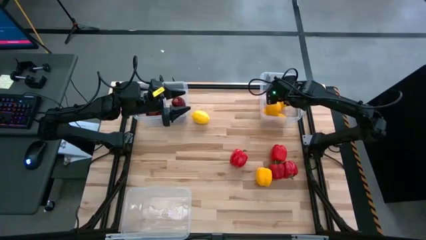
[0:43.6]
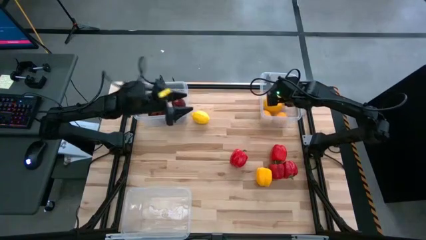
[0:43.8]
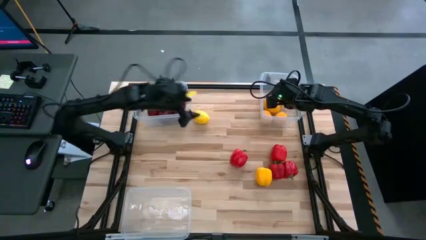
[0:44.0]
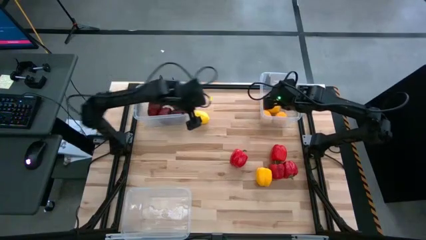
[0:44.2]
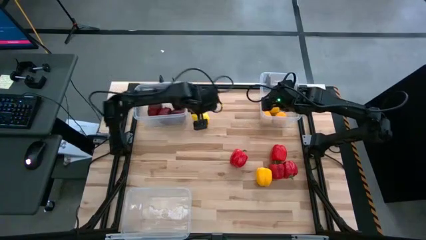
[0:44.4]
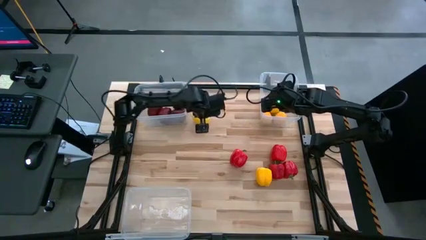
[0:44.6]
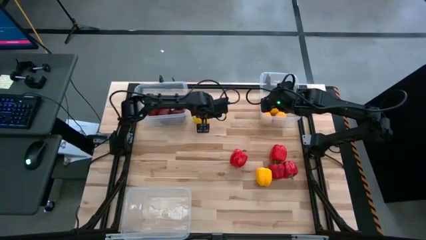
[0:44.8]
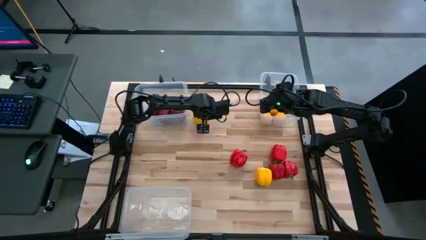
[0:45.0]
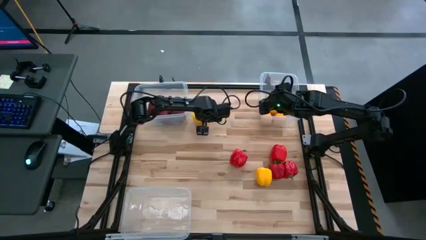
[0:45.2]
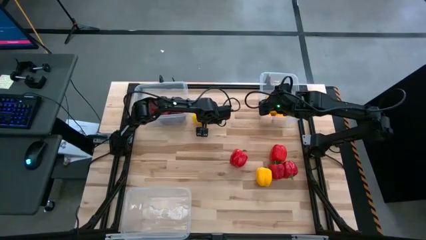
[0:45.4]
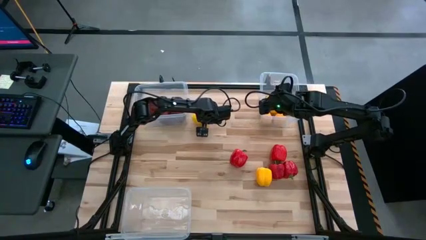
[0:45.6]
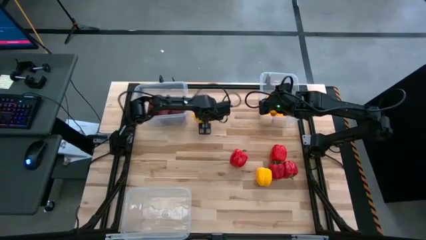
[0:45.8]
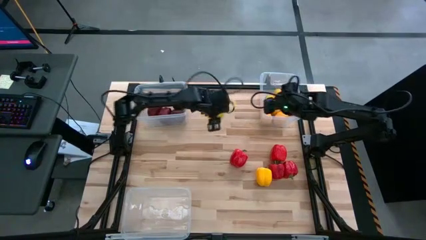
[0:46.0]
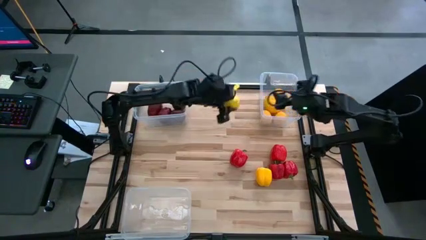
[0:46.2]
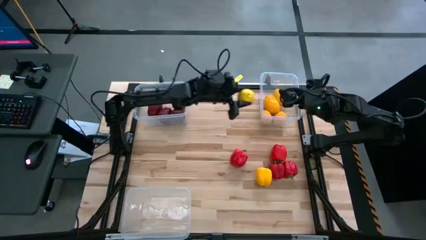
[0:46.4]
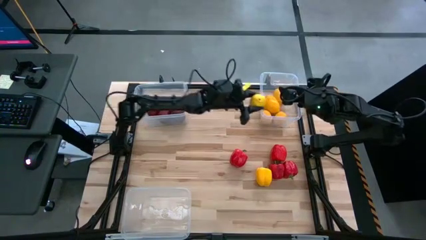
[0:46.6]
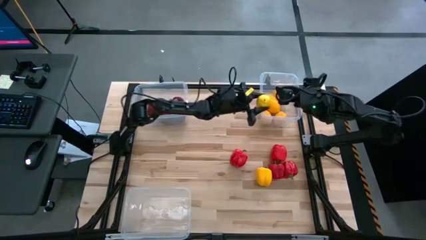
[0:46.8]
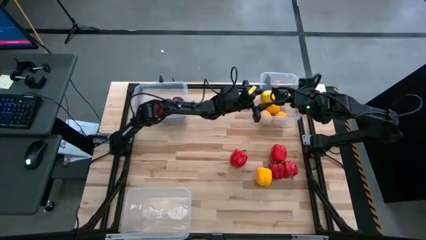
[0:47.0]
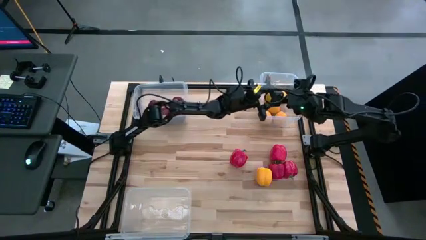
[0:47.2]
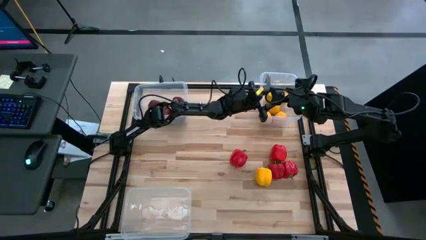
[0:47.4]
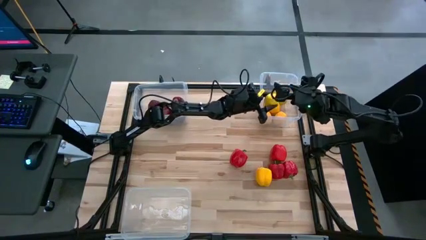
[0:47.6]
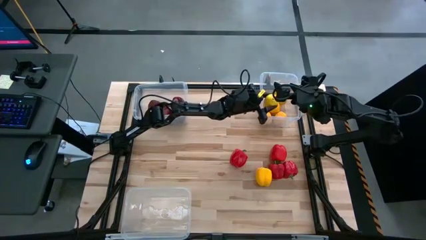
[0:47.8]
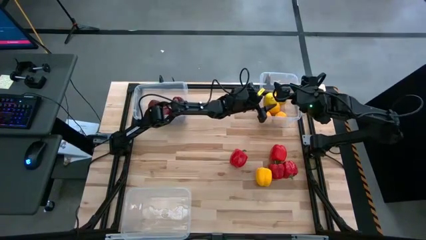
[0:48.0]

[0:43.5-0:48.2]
Task: Sort produce into baskets
Put the yellow lemon into the top-right transparent bin

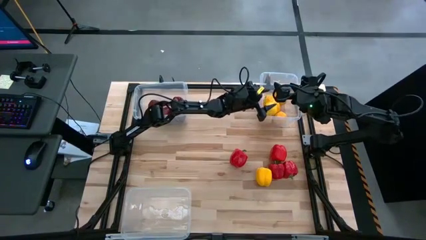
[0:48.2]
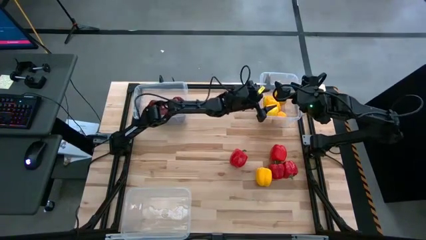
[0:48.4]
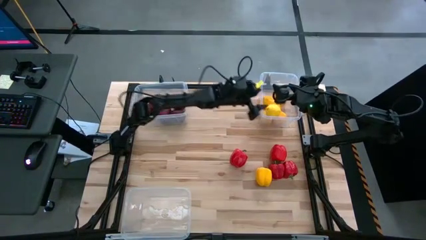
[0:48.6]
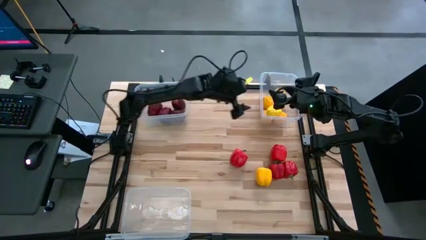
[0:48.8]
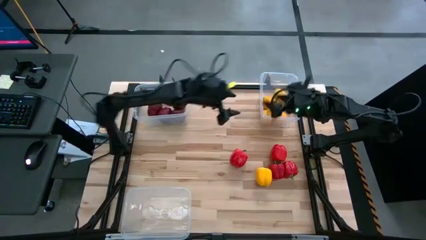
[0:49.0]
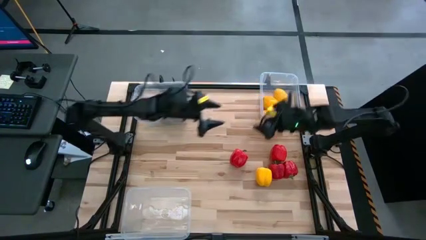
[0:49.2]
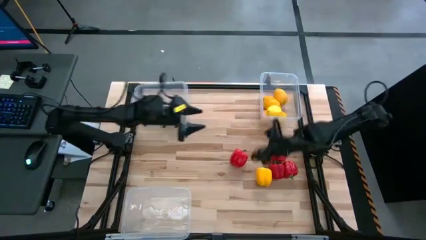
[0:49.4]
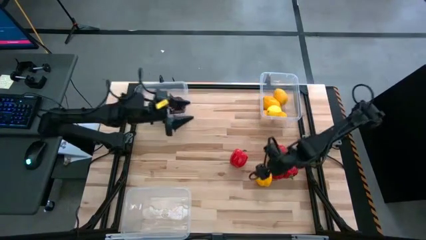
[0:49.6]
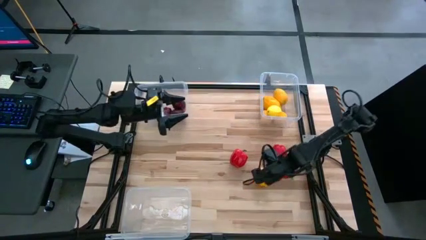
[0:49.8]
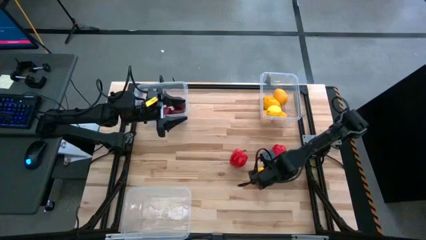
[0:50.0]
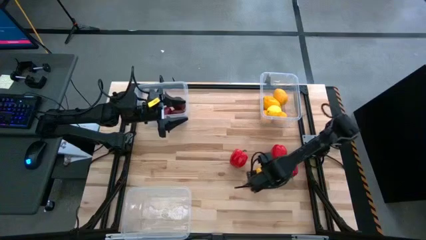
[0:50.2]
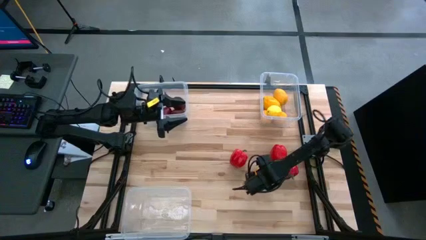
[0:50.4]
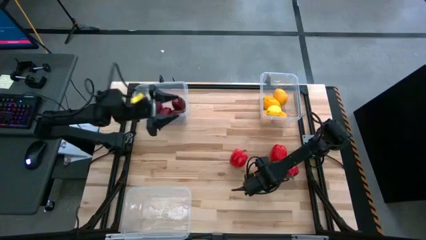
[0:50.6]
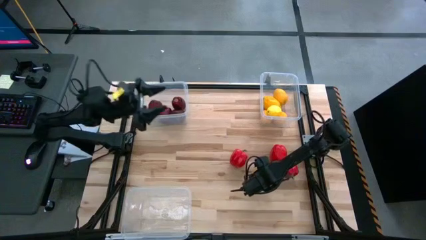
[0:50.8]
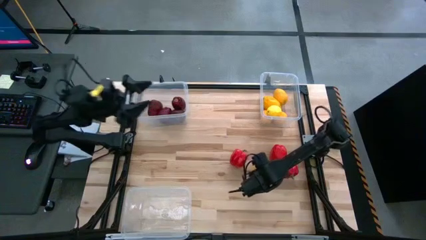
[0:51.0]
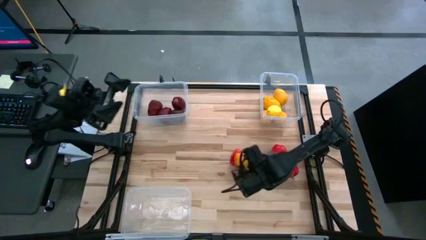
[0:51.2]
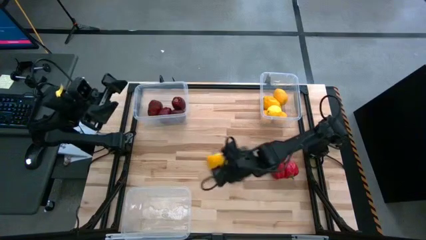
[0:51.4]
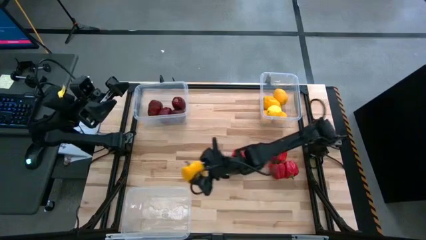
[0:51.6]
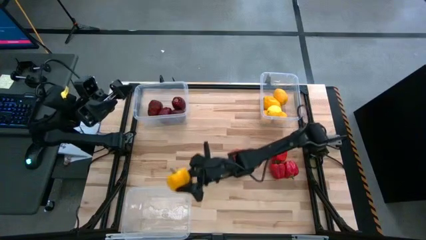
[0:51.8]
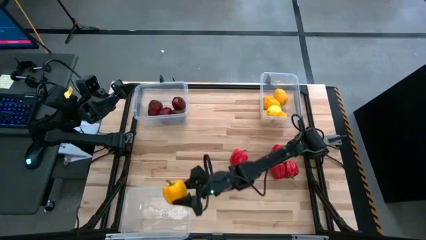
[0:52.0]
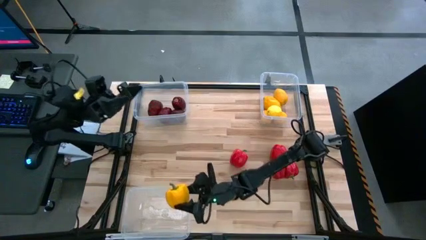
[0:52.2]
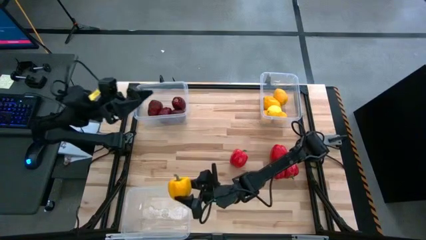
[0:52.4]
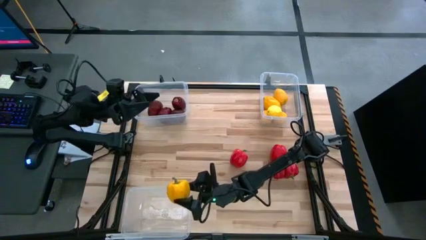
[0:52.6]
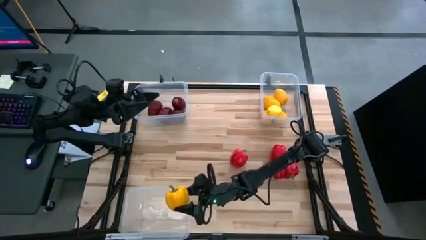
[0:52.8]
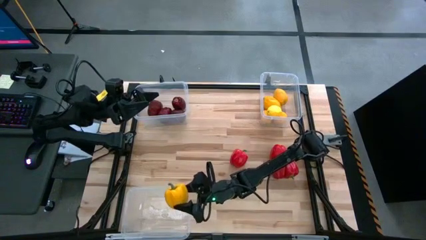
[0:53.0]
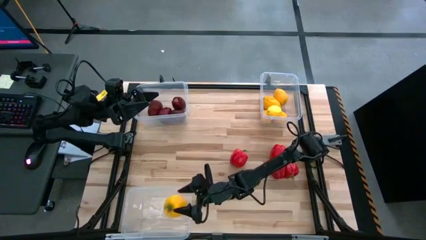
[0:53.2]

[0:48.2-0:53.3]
Put the yellow bell pepper into the bottom transparent bin

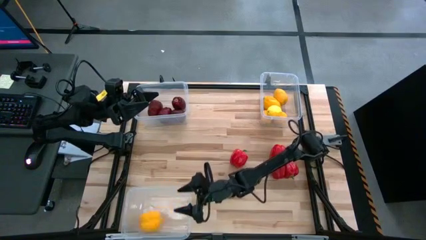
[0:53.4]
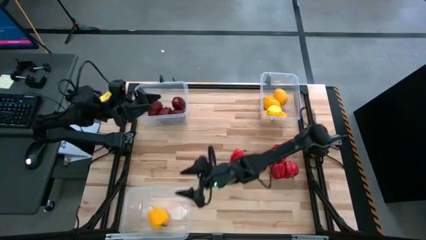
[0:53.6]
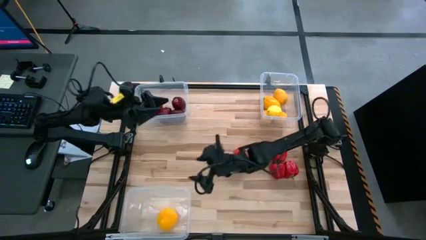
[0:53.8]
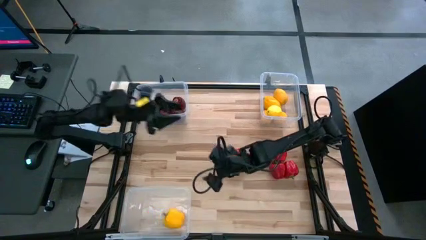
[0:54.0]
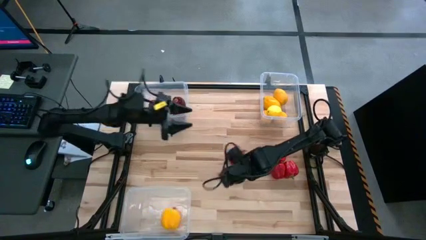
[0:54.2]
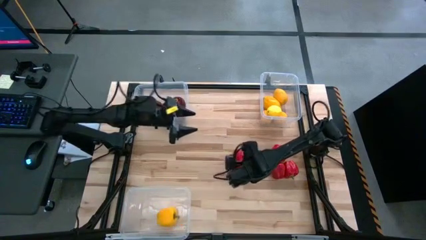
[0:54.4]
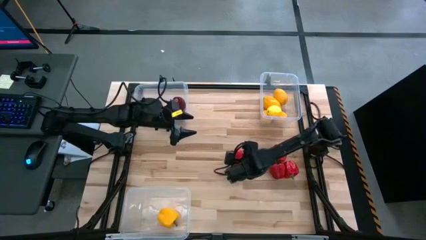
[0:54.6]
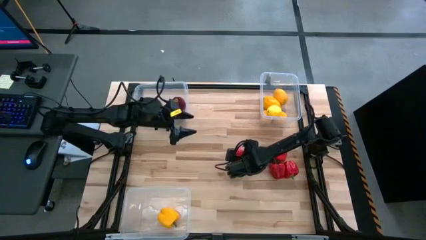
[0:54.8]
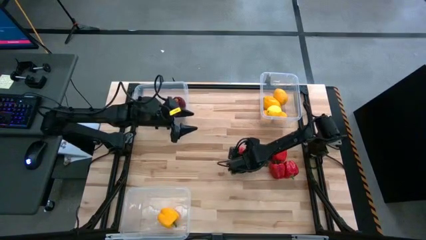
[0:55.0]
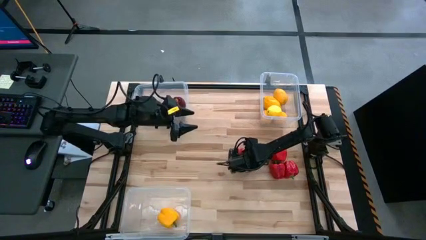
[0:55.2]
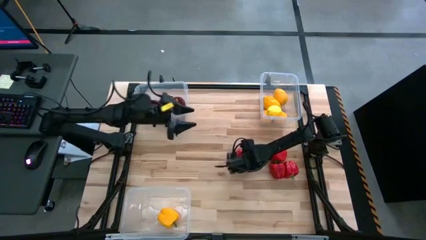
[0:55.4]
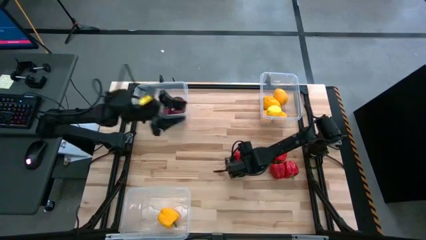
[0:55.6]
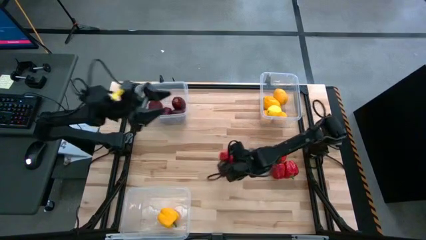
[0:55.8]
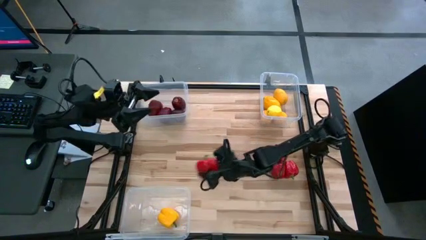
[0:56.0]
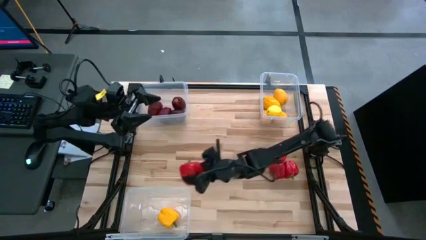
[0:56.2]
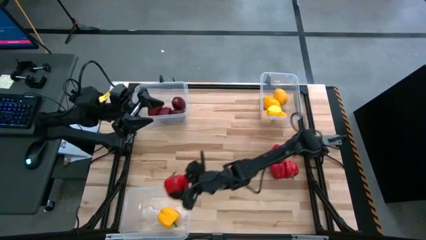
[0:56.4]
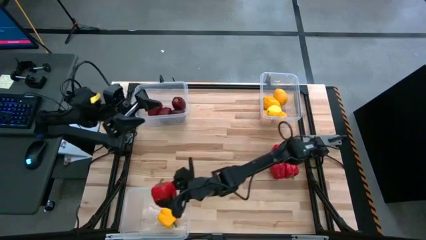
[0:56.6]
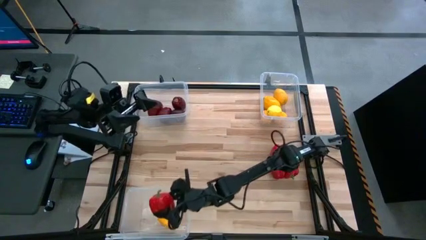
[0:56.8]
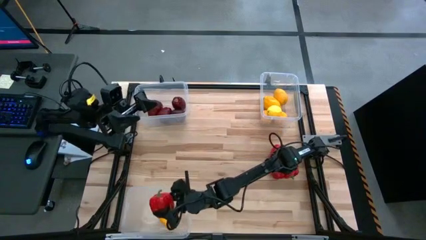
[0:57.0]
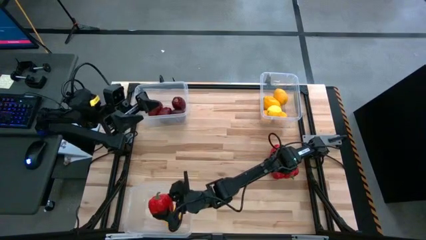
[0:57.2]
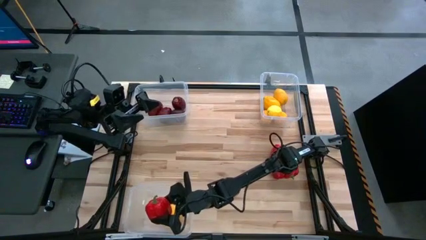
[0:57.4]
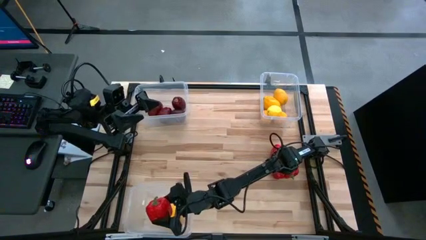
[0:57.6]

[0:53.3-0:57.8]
Put the red bell pepper into the bottom transparent bin

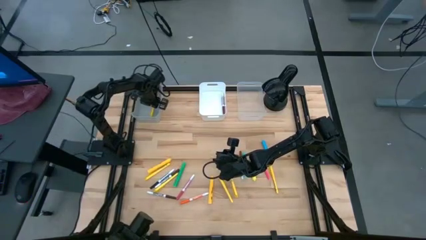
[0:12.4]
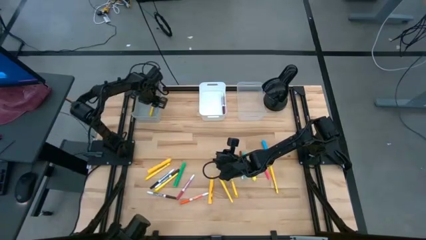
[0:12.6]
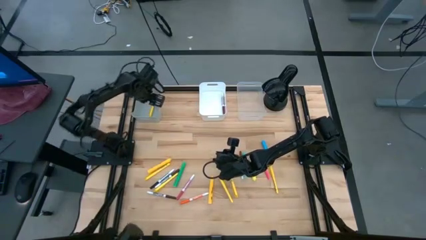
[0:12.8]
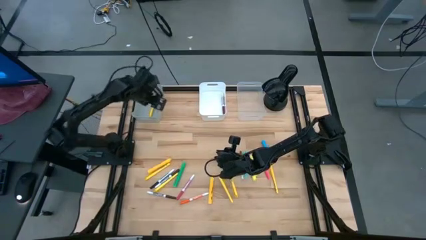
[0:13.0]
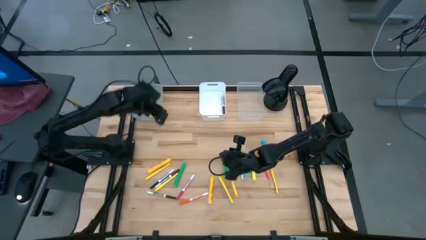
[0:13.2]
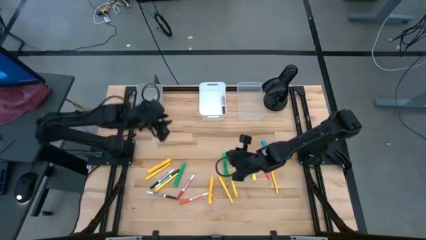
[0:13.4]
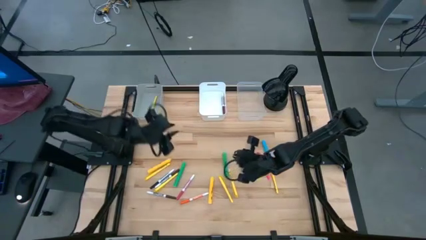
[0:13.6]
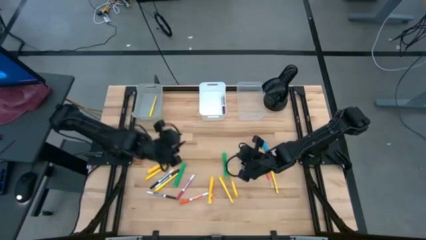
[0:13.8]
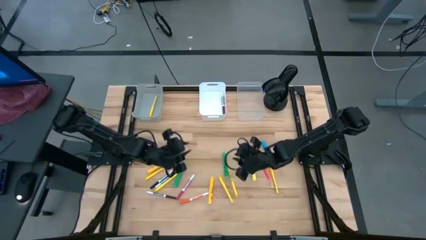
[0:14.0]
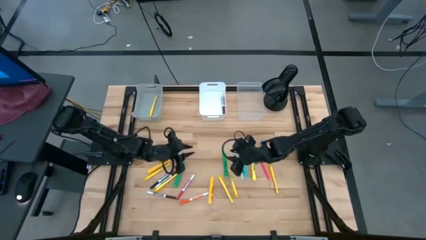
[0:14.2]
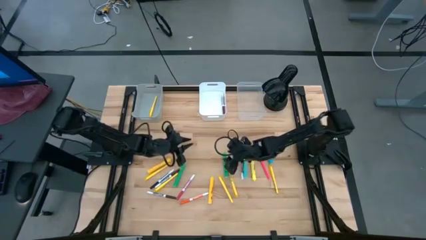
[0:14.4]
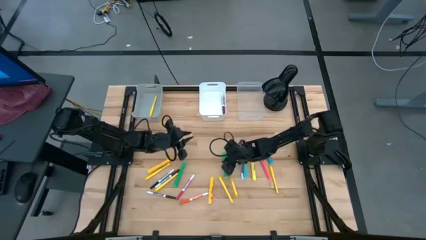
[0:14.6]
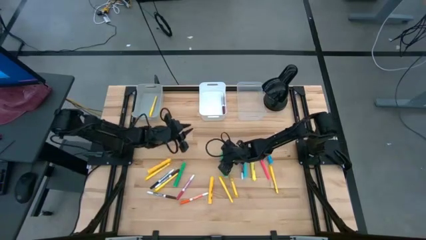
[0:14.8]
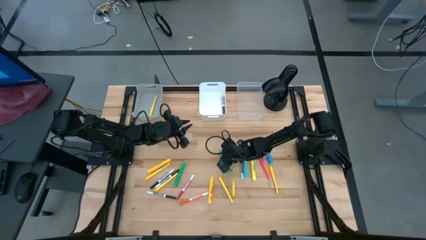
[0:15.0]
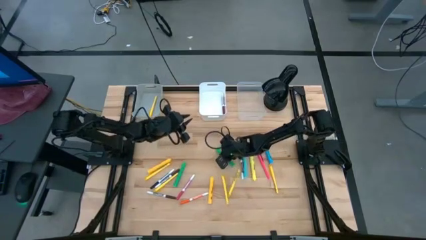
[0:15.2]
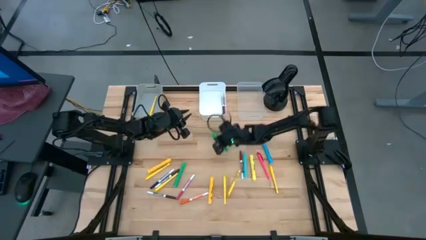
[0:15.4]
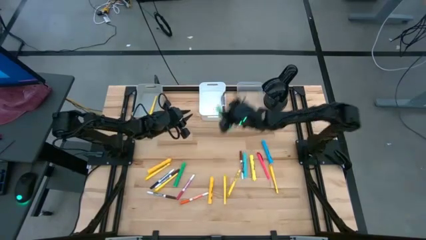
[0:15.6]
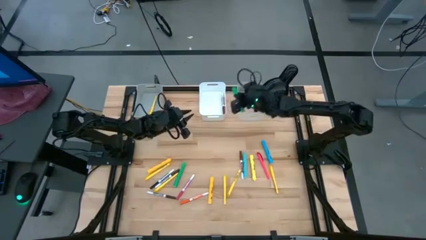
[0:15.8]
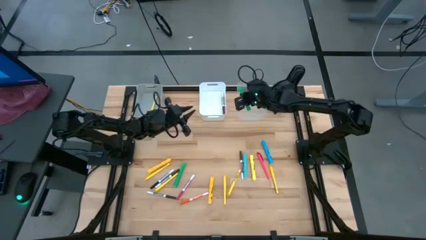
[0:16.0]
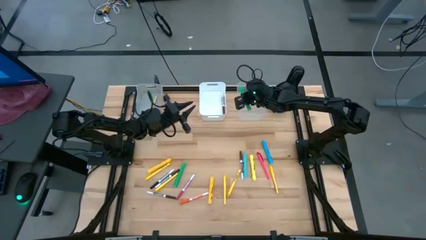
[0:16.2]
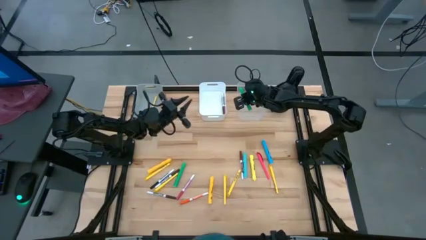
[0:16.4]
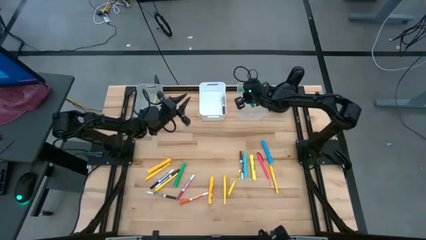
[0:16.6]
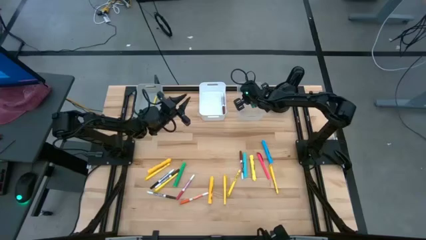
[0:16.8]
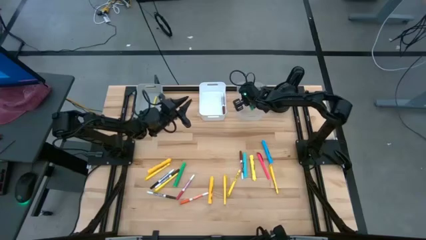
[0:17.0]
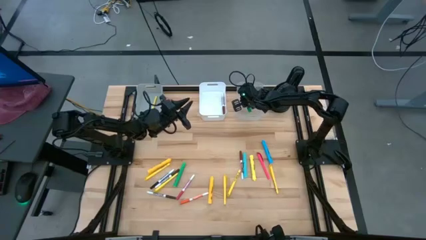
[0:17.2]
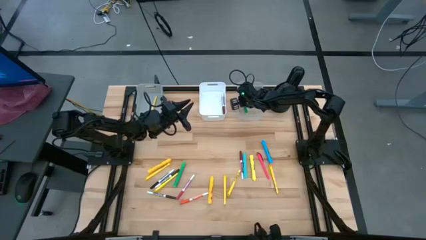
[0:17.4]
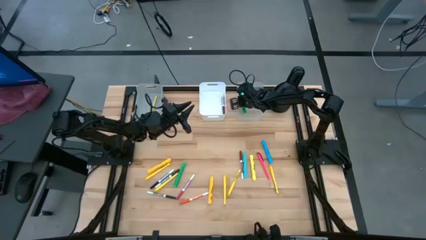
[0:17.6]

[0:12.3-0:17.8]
Task: Pick & Place Markers
Put the green highlighter into the transparent bin
